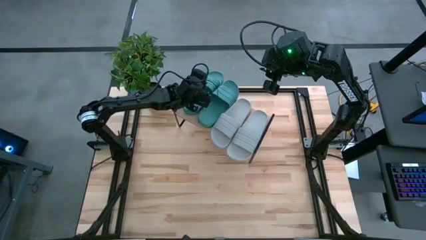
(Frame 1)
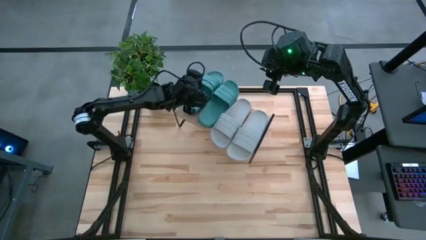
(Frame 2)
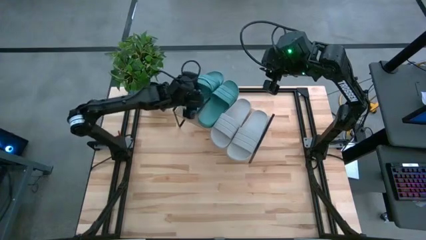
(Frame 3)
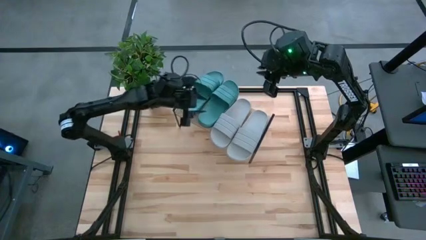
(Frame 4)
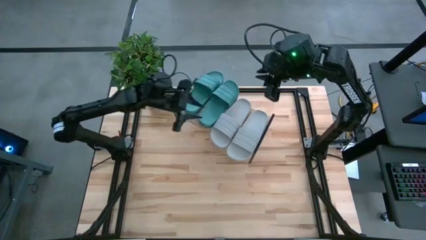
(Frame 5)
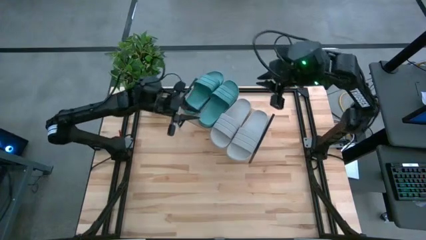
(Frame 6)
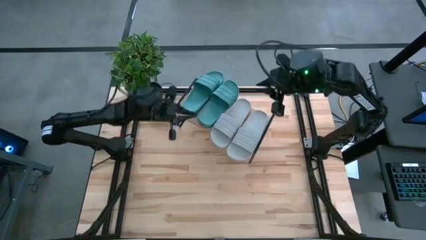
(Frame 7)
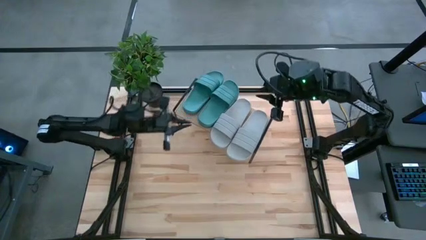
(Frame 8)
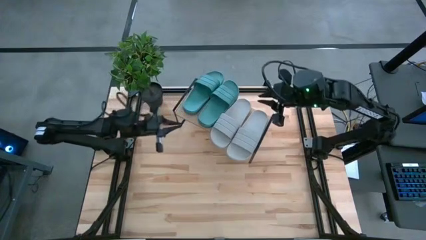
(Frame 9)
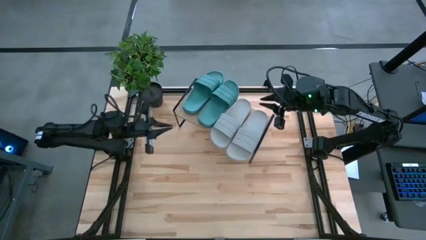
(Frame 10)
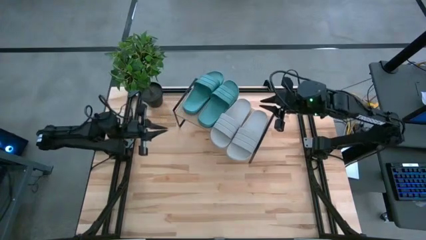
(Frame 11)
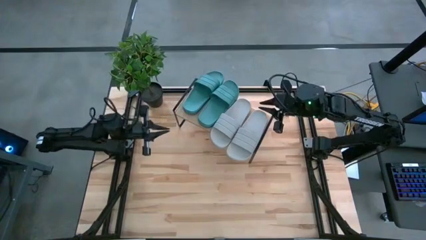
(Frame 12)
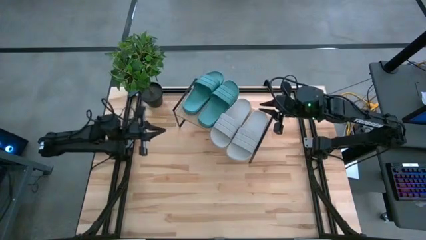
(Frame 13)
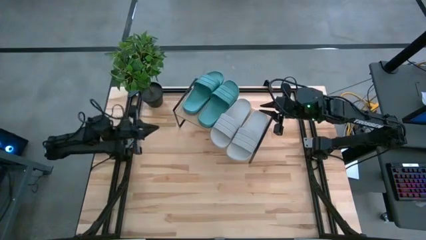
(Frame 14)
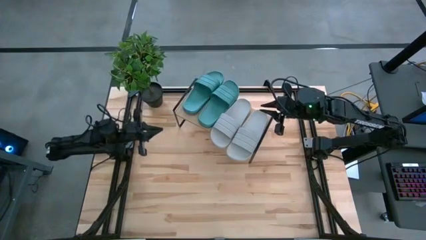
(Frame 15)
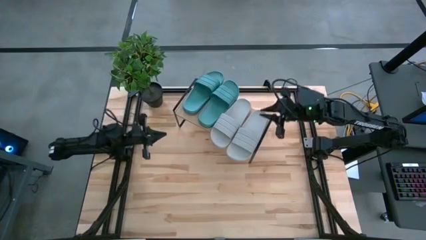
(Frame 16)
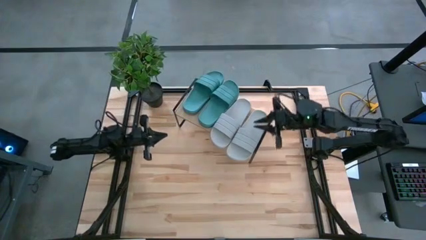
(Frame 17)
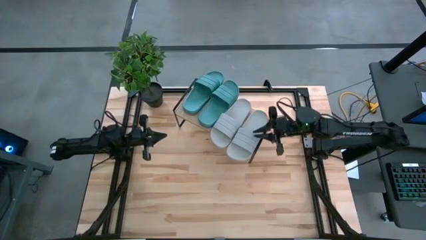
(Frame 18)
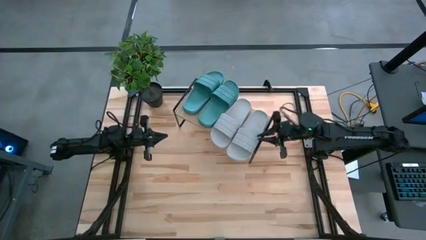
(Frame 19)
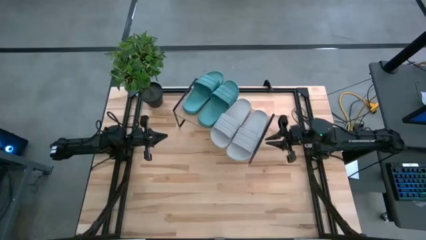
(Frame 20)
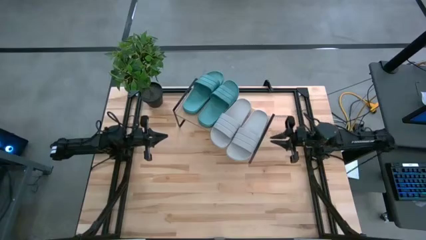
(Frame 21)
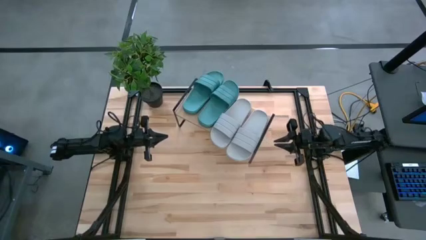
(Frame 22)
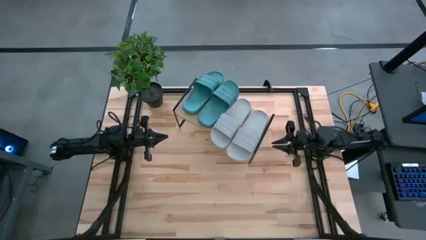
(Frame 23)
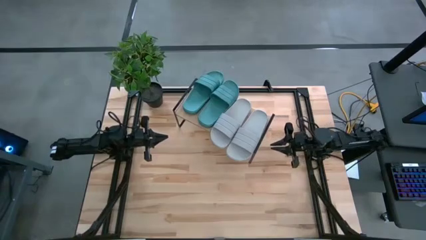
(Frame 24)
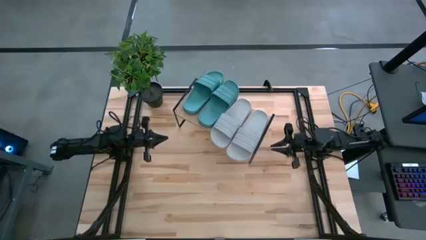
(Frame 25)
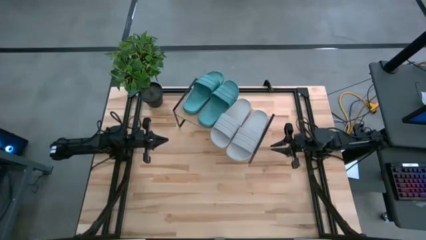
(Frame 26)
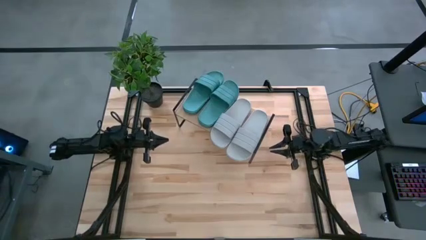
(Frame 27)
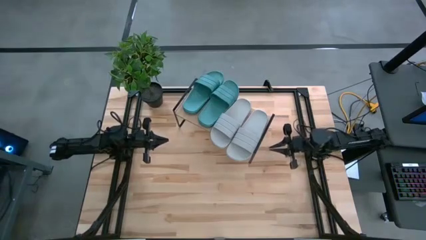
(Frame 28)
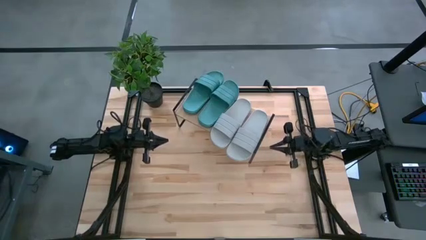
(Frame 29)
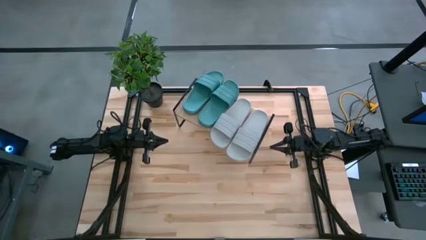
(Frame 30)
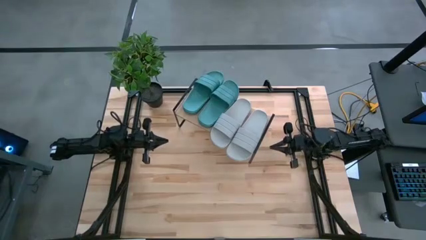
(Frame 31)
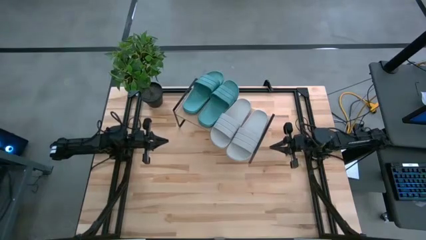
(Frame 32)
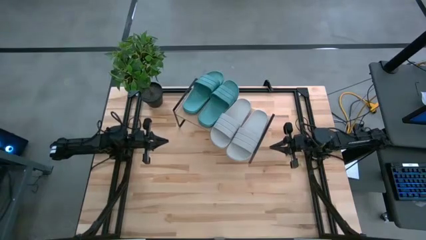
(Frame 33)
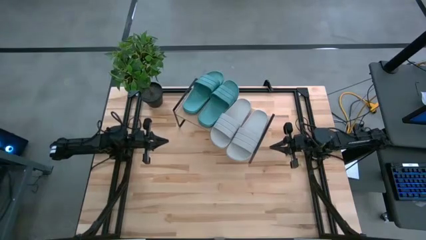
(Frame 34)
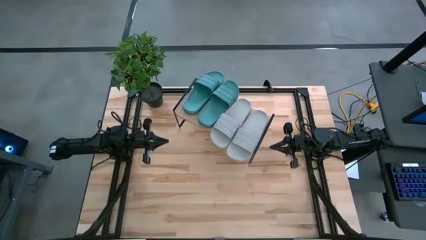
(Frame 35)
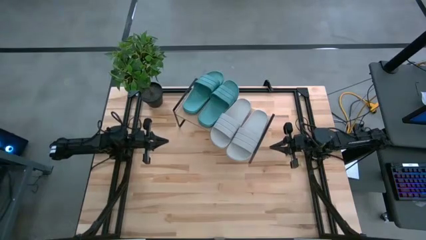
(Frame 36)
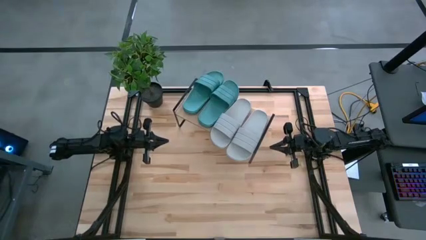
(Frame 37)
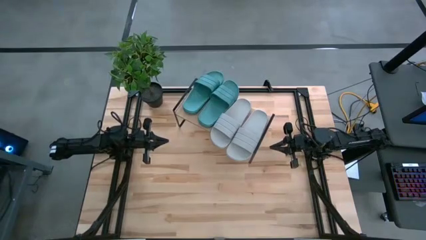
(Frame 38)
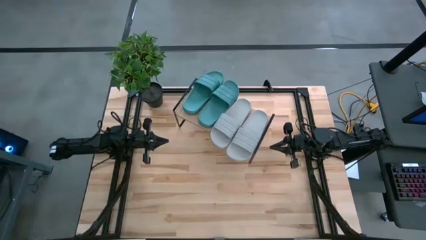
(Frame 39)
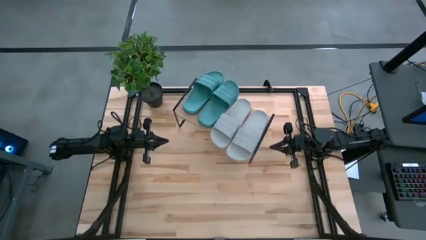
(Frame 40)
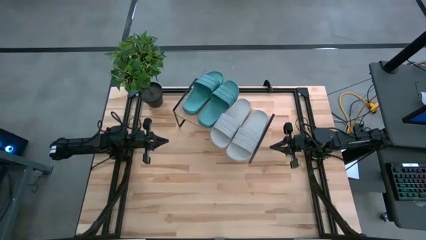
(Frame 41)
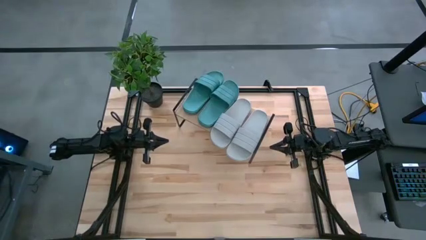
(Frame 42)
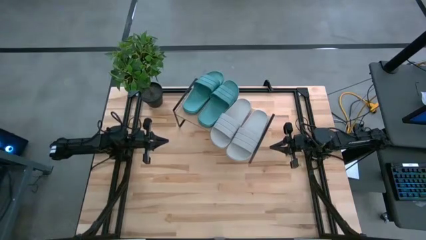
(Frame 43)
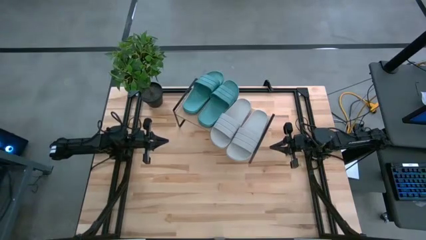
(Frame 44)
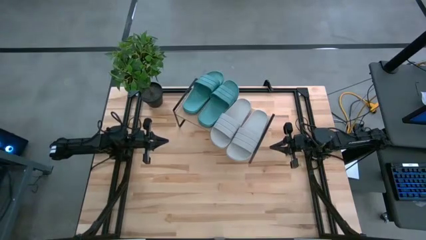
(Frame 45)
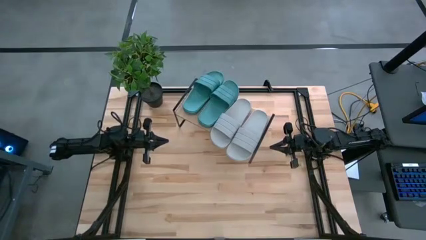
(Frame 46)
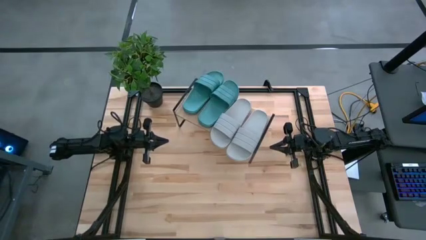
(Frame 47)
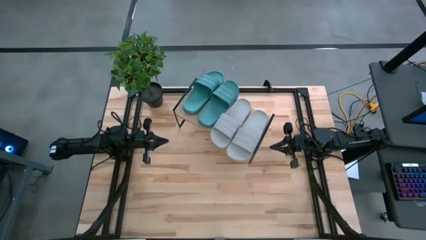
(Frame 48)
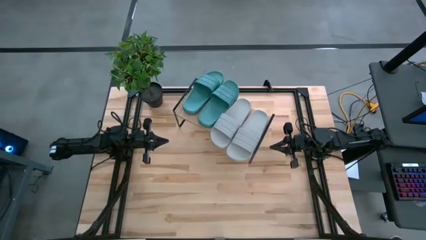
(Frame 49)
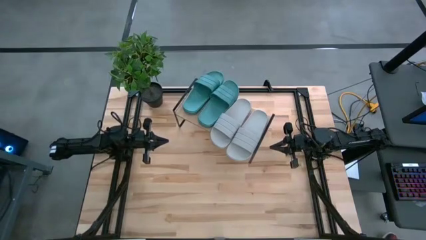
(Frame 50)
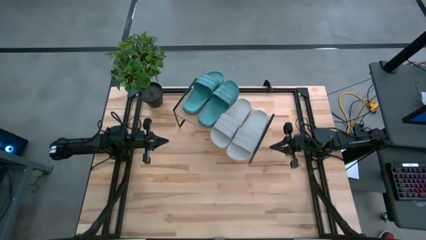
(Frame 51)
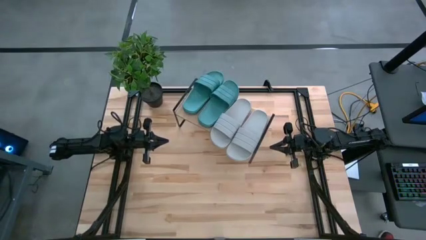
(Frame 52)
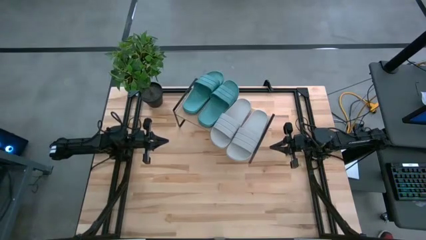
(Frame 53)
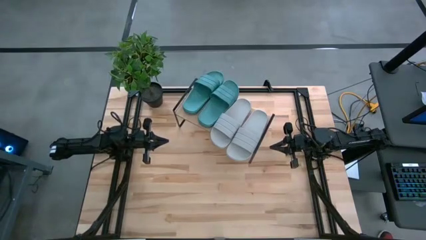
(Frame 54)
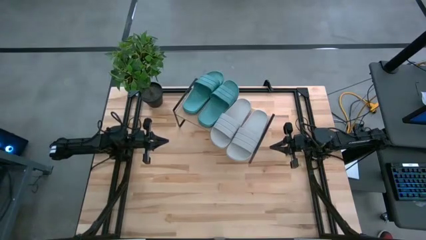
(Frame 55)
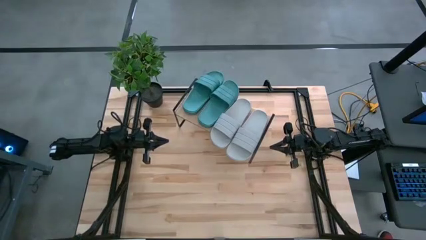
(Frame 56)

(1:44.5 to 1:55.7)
Task: Pick and place slides into the shelf
Return to Home Position

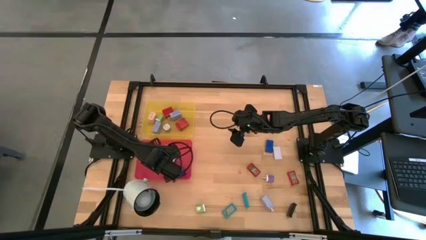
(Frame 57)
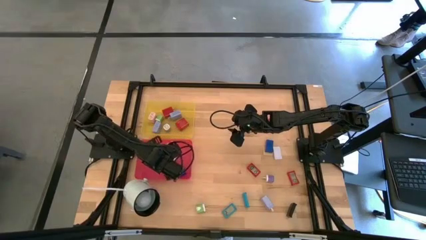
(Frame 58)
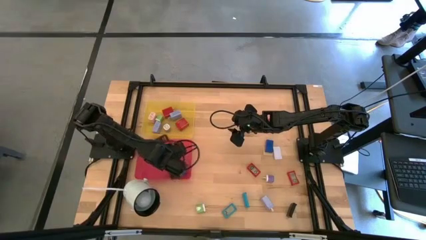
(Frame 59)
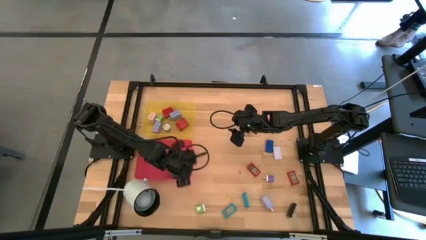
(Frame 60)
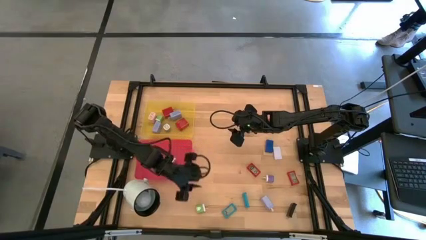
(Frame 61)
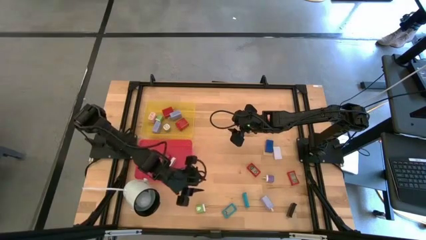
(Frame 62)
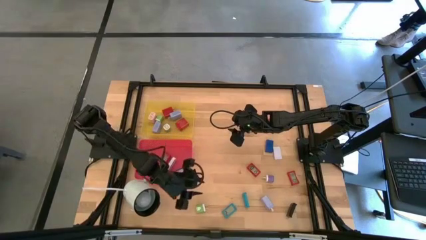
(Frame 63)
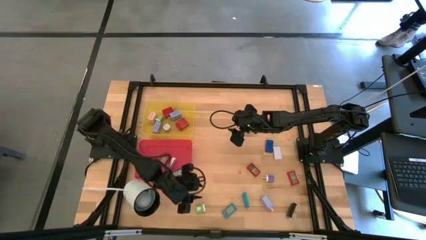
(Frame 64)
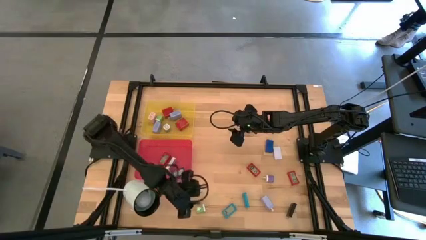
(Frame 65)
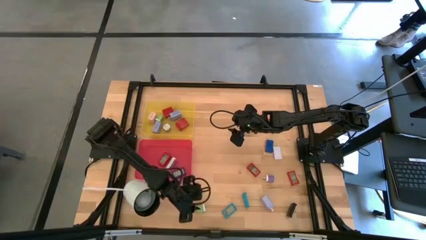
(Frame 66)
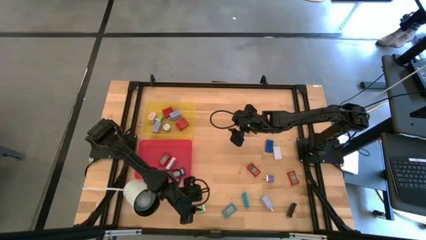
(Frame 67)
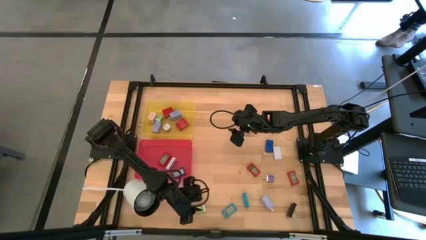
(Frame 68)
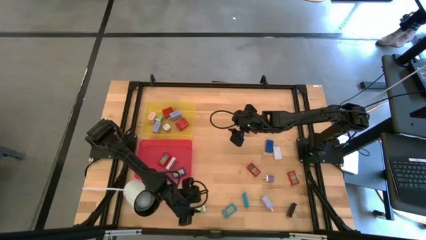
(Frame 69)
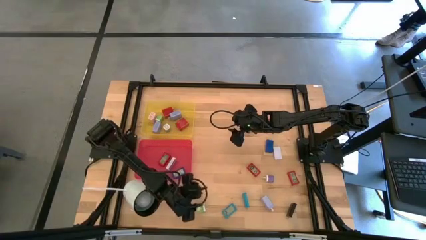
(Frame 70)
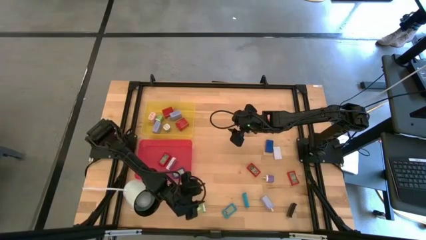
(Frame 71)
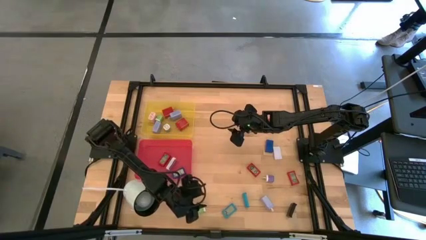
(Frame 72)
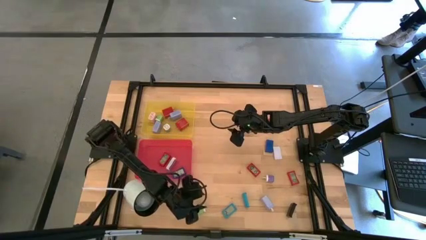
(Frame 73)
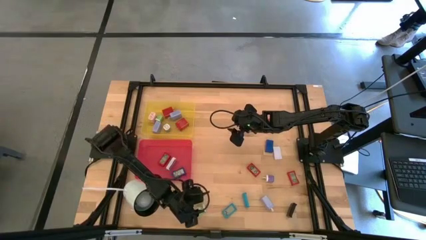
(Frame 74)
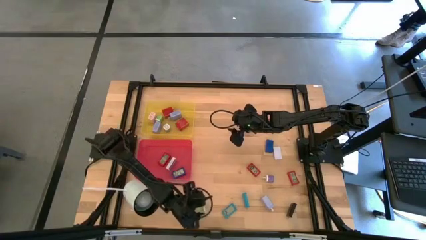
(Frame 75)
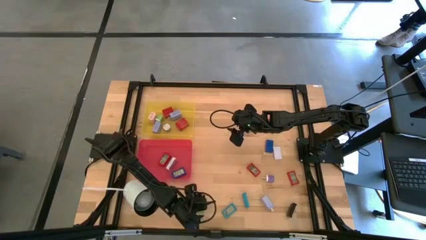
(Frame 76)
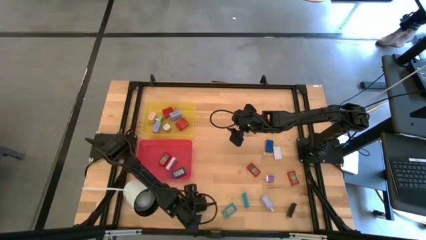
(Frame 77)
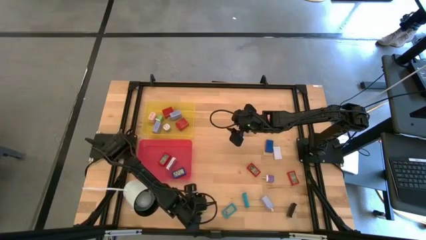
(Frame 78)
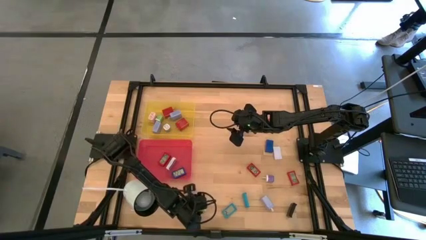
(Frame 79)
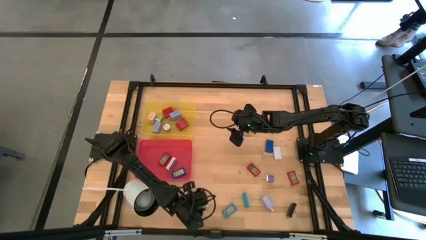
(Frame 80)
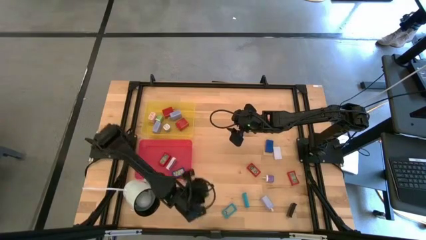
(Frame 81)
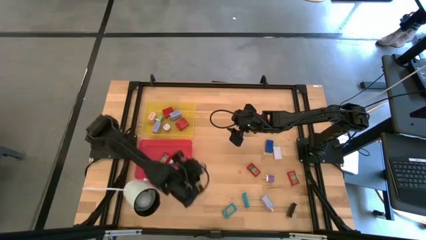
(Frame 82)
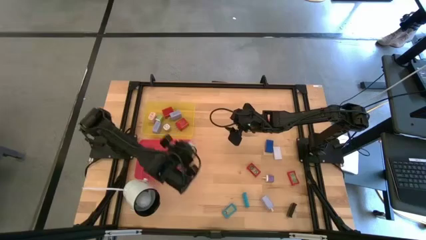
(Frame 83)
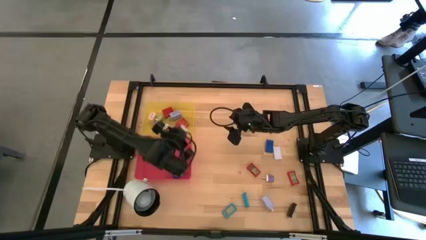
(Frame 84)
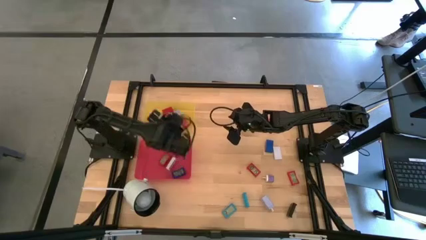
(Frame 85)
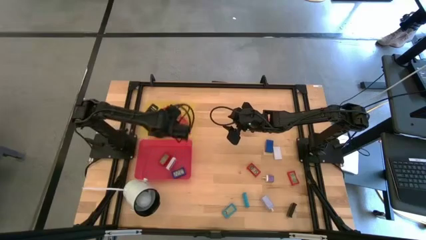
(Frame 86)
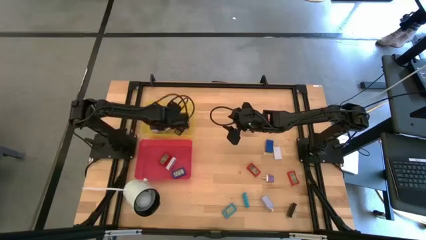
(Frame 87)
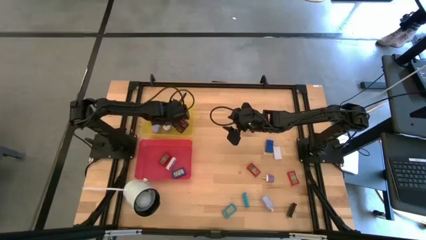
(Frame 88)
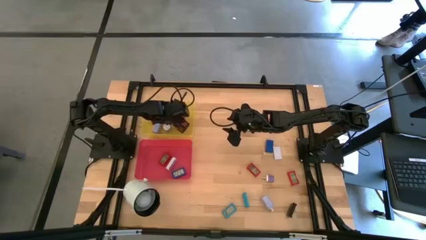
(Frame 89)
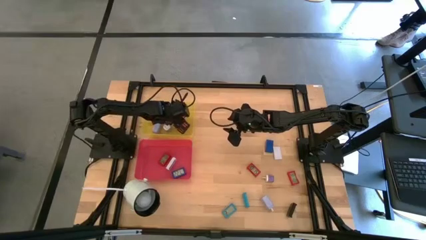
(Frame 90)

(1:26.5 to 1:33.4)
Task: Pick & Place Office items
Put the green charger adapter into the yellow bin
